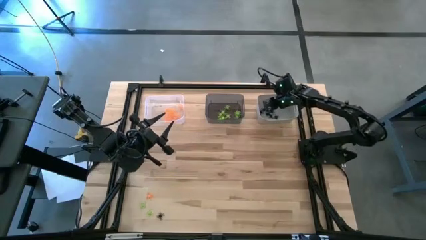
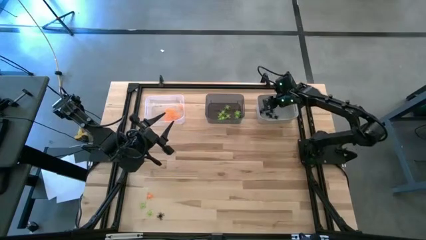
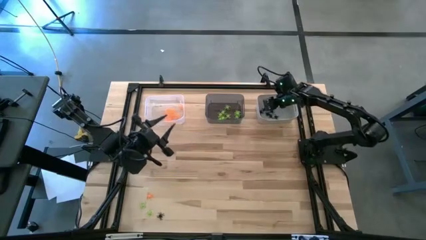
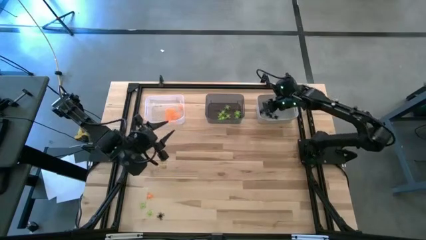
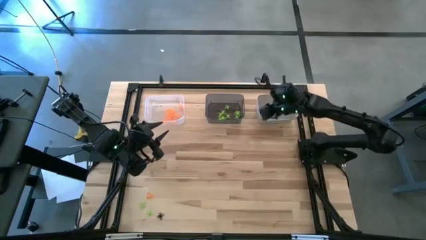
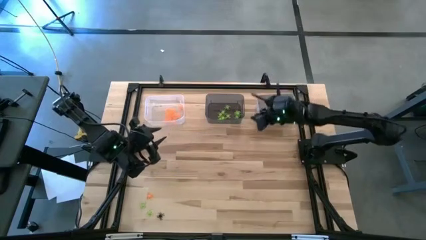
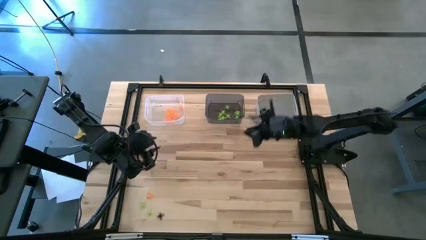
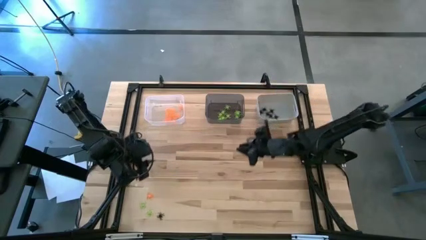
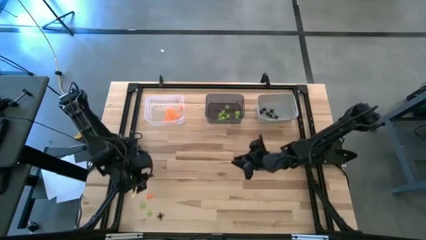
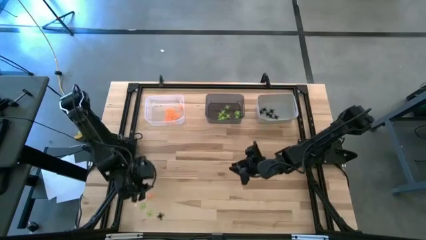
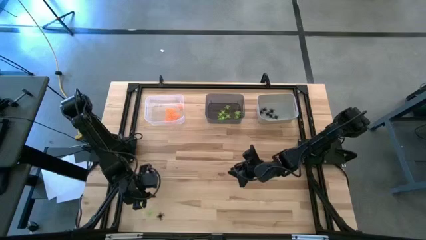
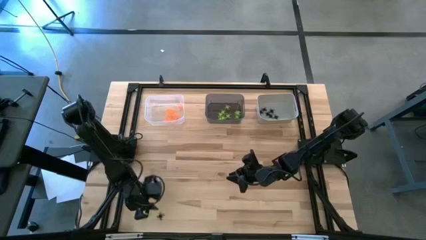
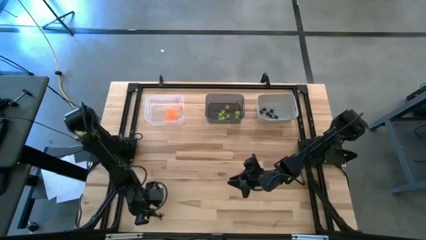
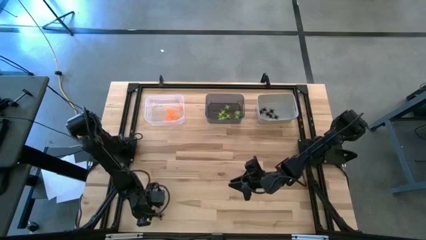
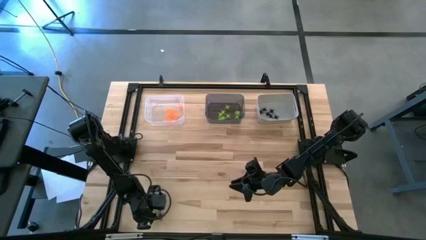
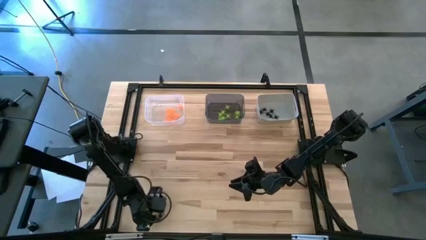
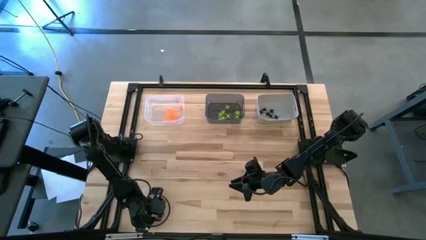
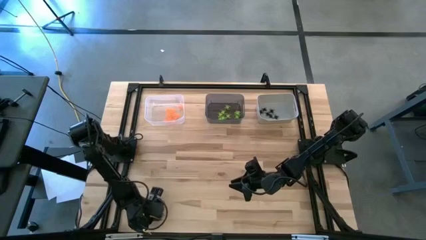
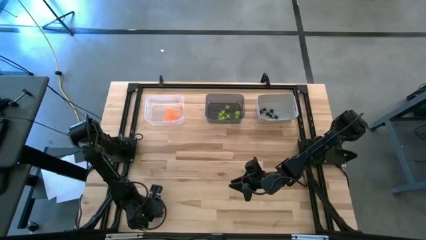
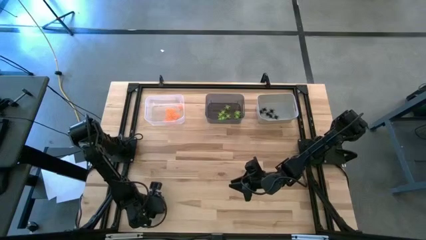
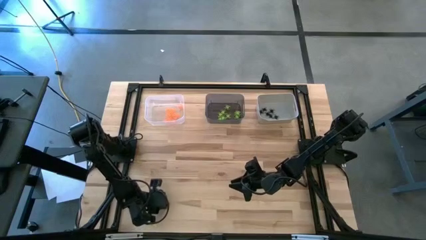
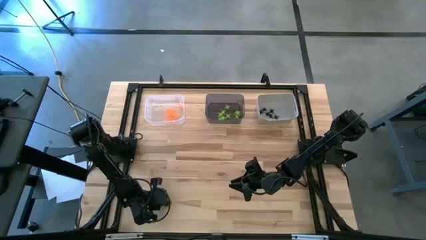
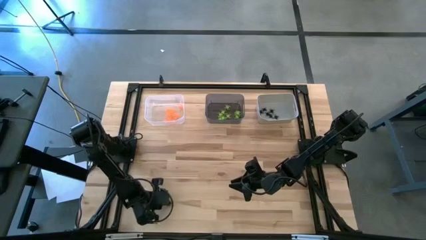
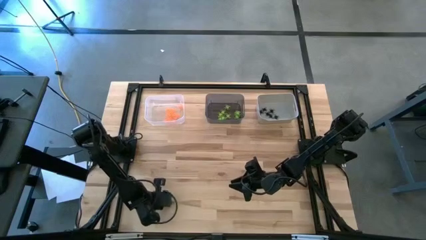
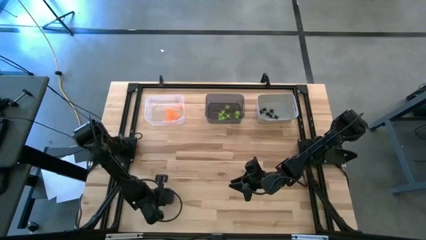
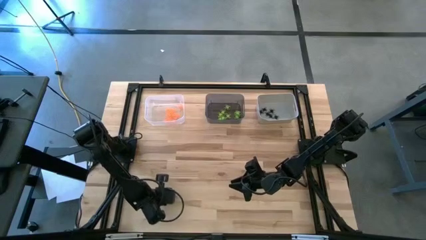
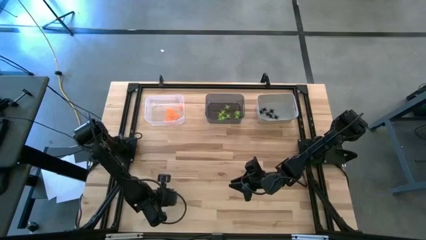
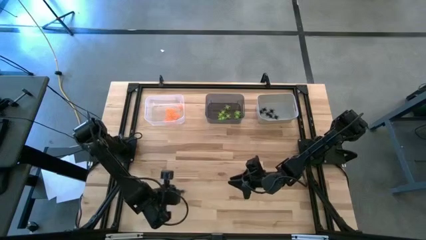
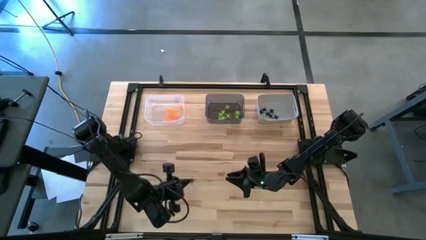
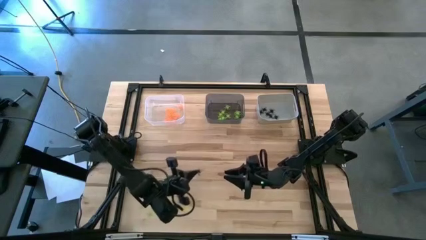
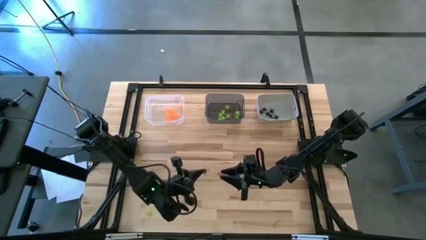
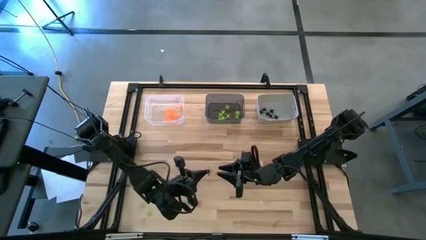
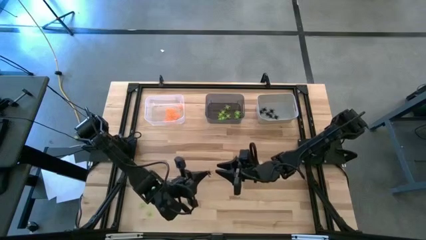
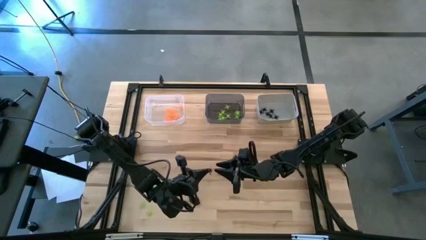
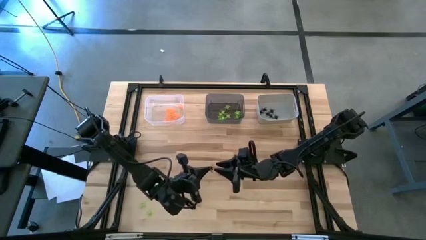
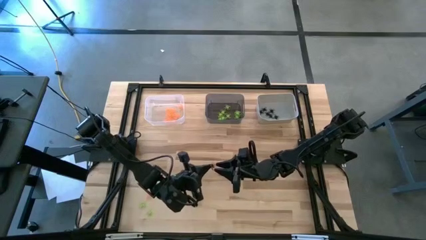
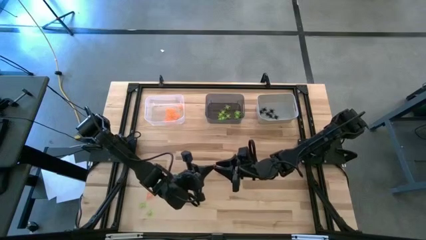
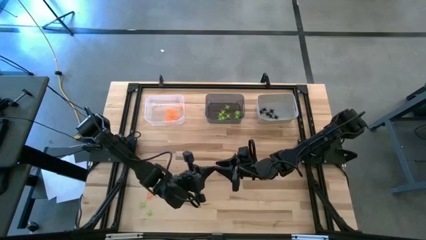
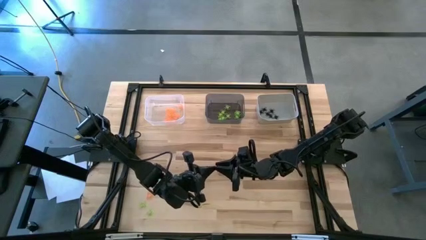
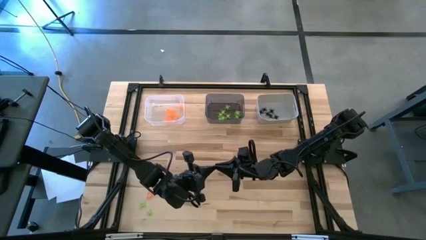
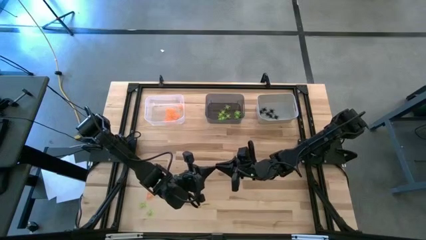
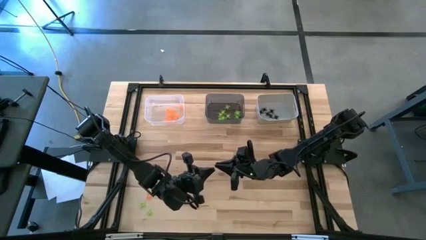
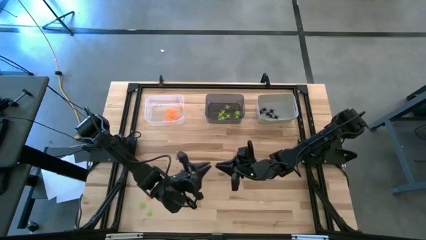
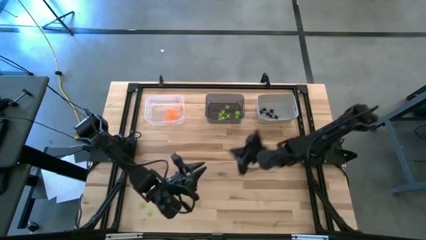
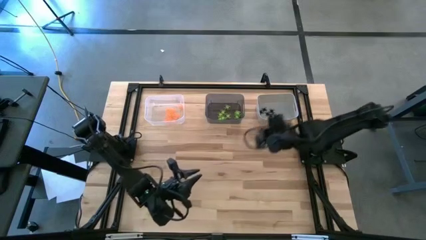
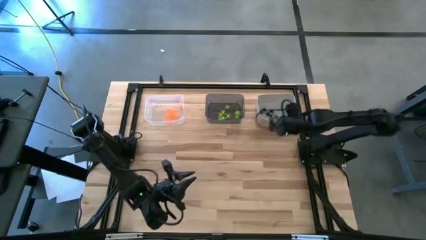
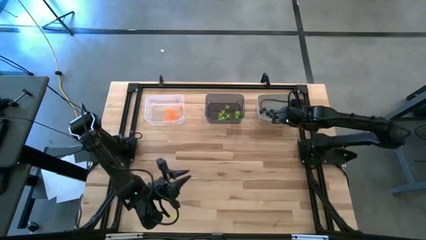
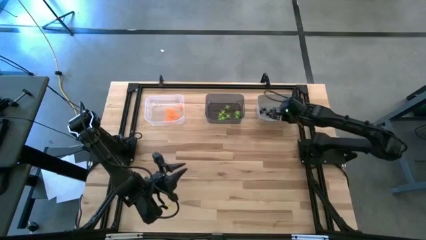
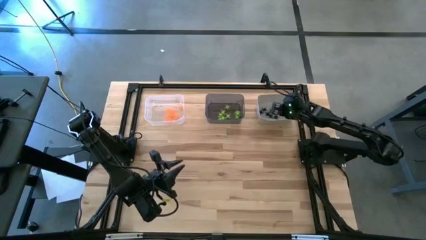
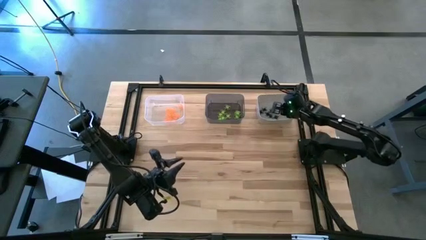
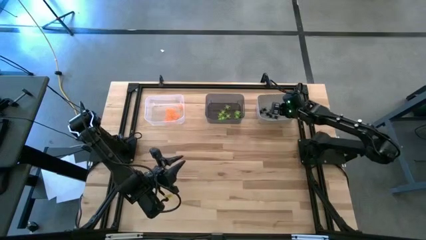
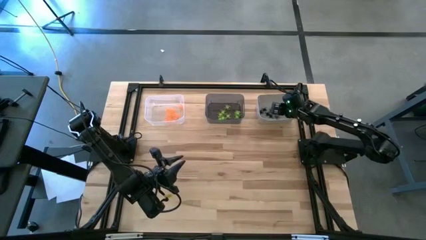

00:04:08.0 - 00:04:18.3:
Task: Sort Halloween decoration
Put the black spider toy into the white bin

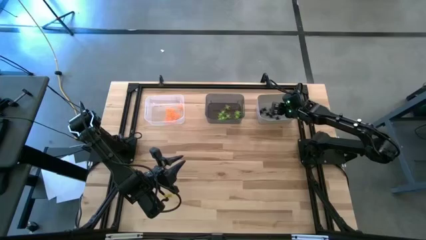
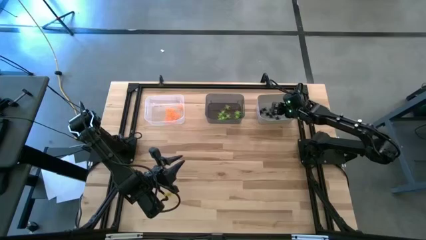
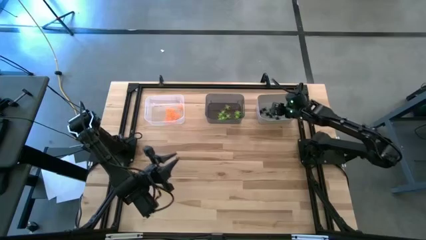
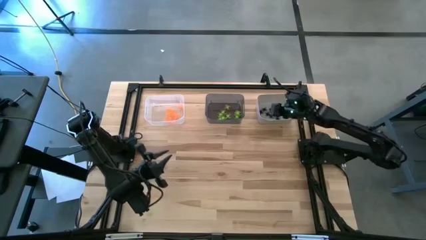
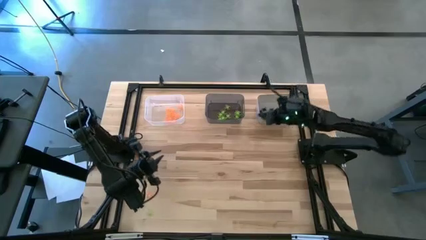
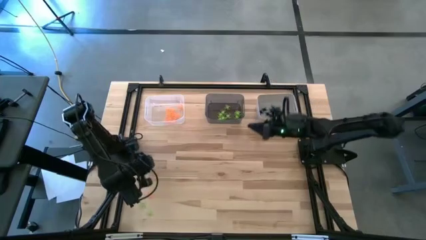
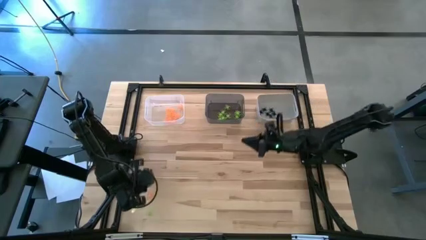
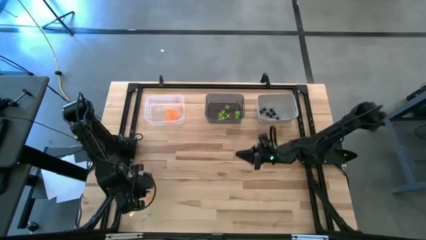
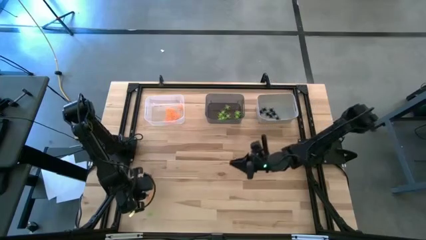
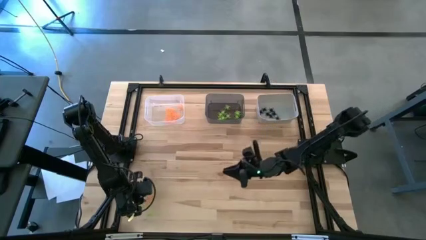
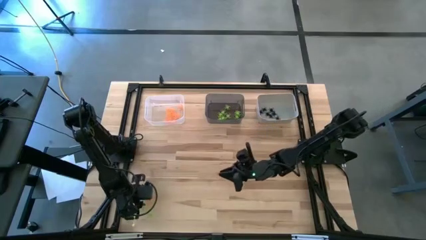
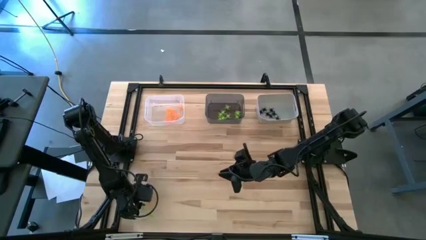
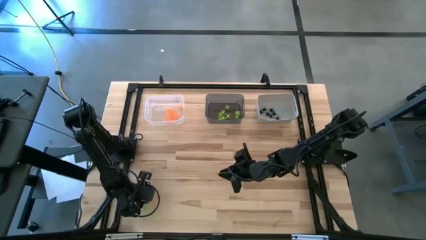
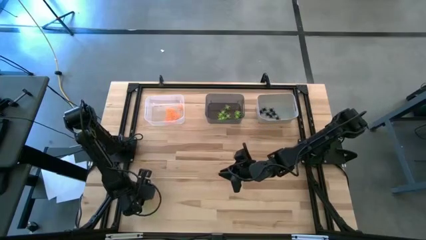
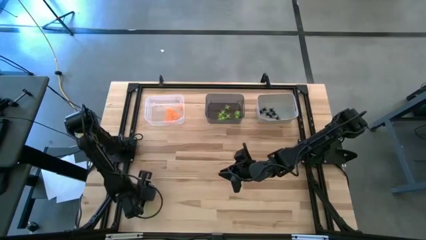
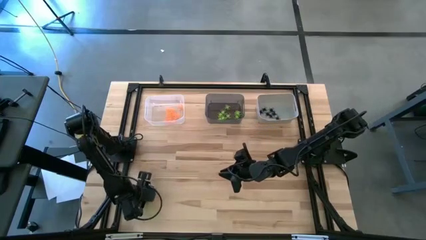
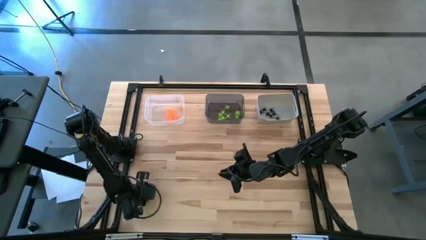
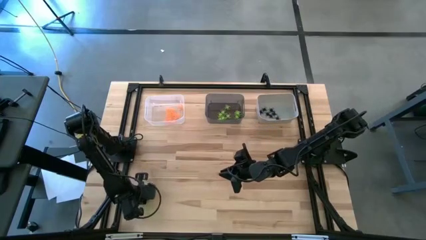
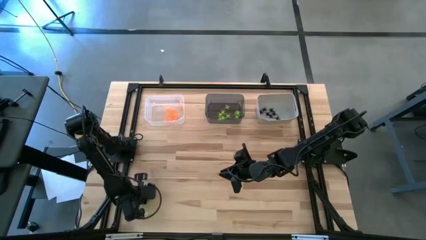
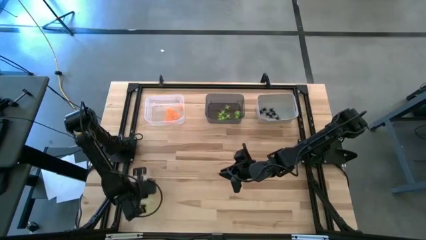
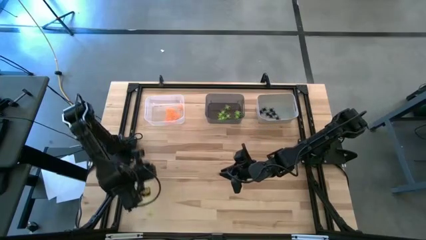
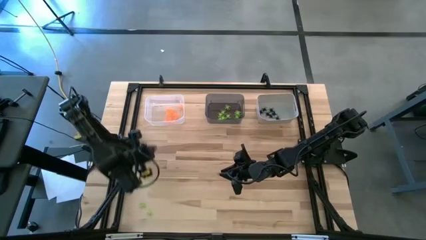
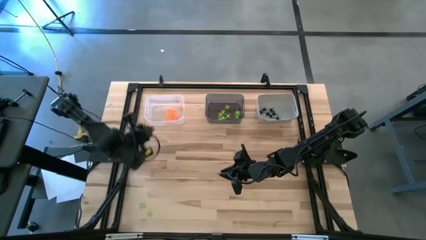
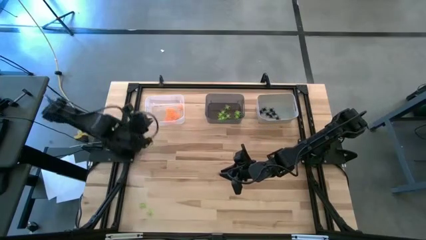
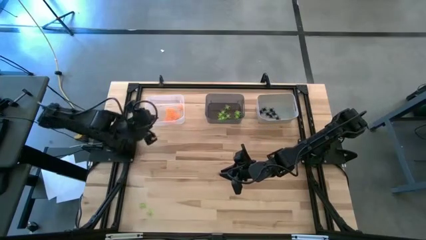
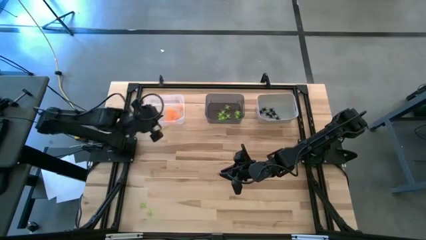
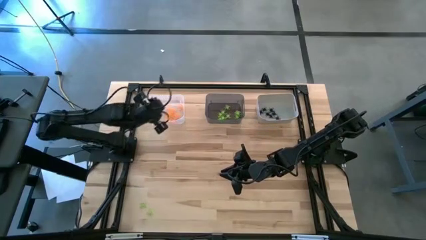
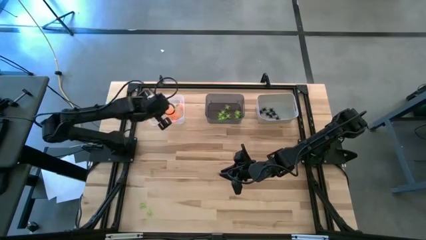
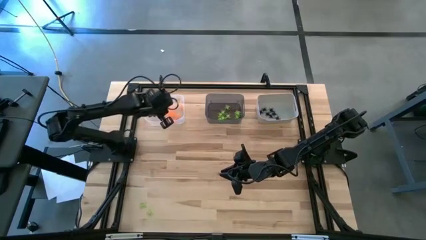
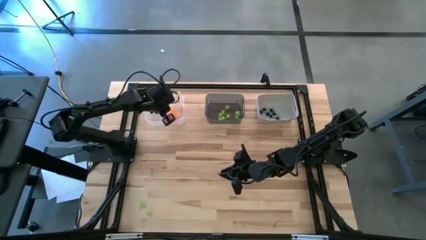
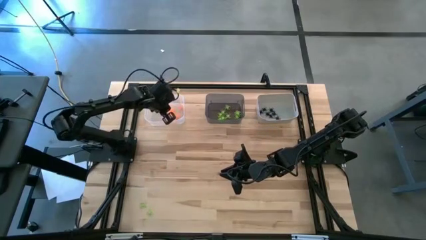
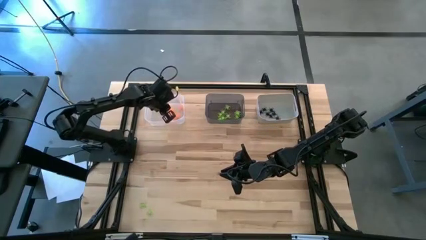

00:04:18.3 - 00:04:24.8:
Put the orange spider toy into the transparent bin
